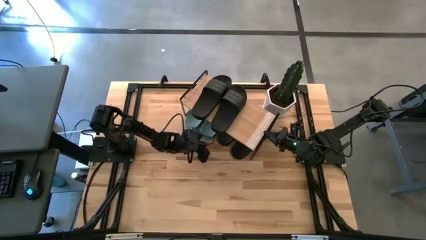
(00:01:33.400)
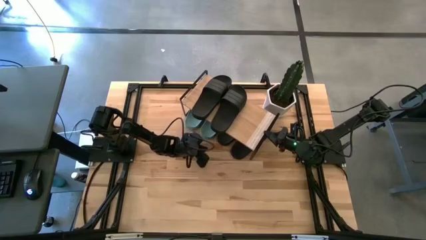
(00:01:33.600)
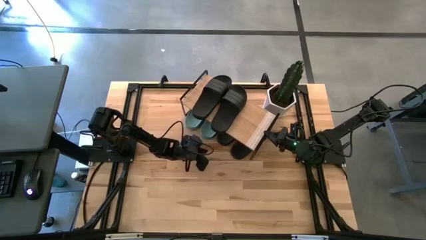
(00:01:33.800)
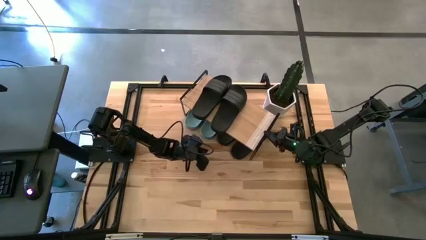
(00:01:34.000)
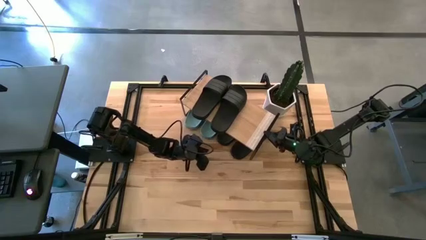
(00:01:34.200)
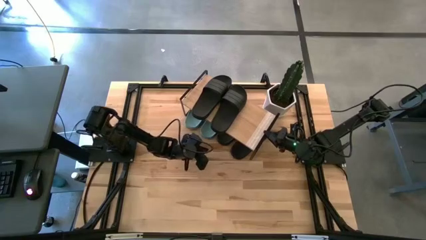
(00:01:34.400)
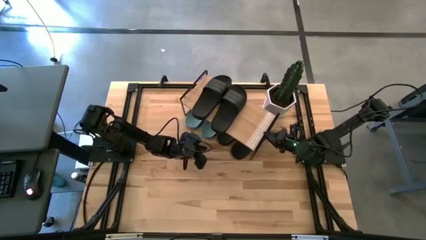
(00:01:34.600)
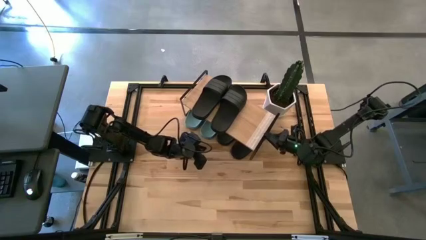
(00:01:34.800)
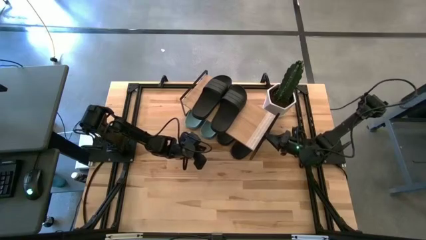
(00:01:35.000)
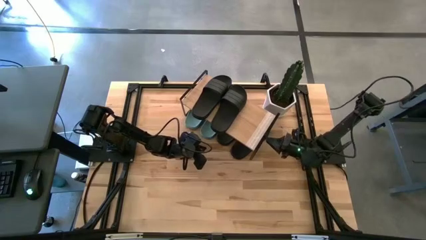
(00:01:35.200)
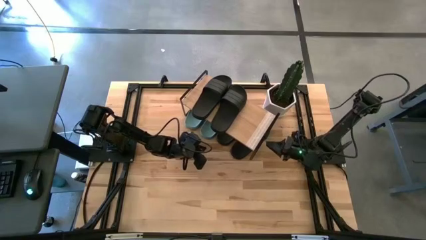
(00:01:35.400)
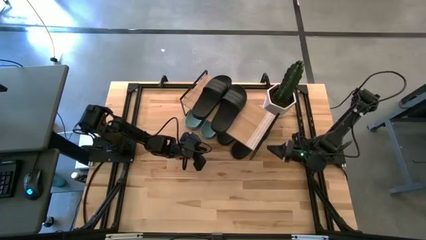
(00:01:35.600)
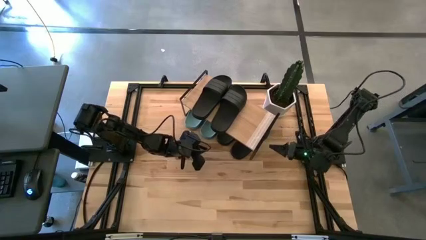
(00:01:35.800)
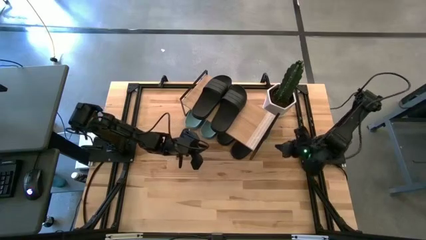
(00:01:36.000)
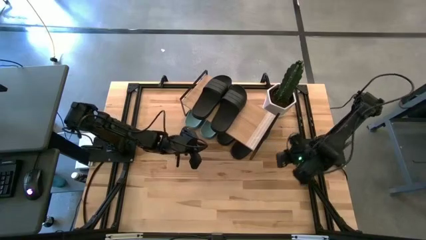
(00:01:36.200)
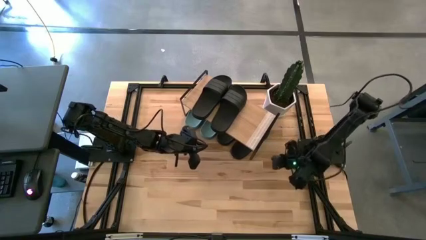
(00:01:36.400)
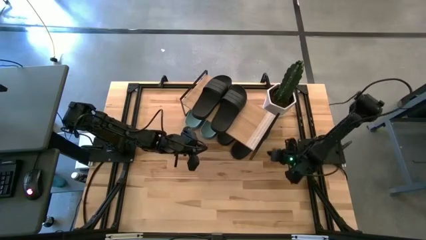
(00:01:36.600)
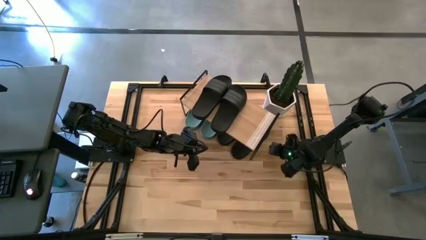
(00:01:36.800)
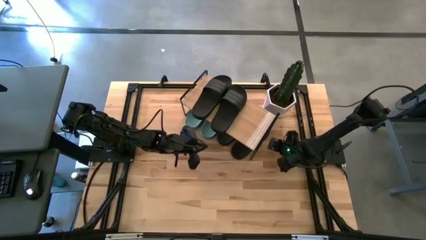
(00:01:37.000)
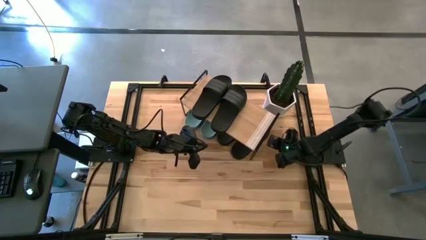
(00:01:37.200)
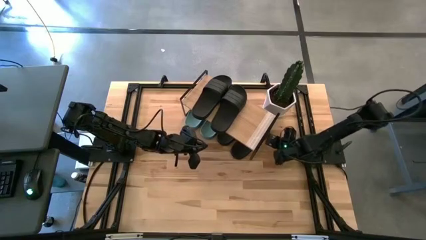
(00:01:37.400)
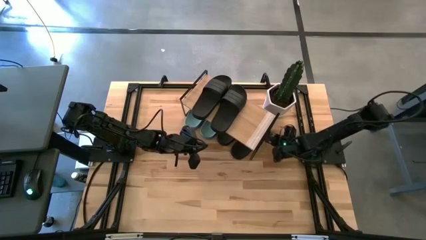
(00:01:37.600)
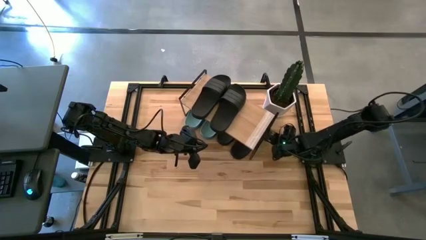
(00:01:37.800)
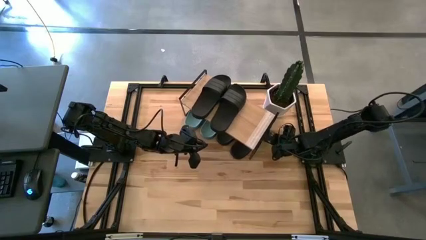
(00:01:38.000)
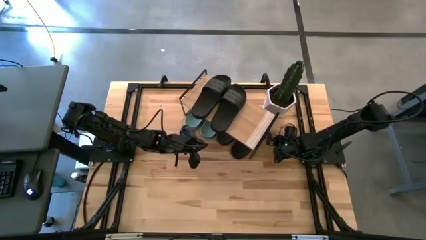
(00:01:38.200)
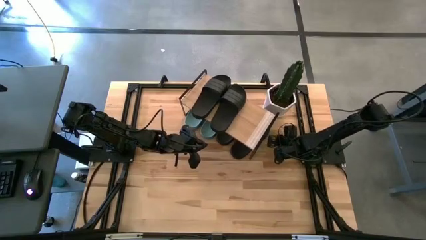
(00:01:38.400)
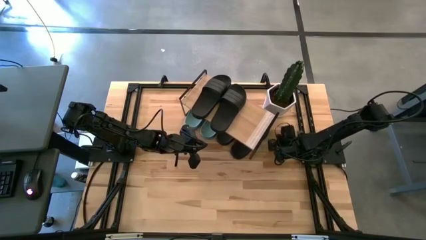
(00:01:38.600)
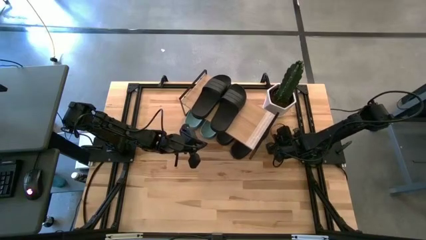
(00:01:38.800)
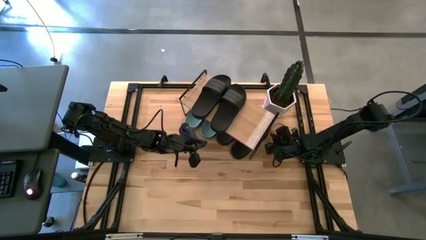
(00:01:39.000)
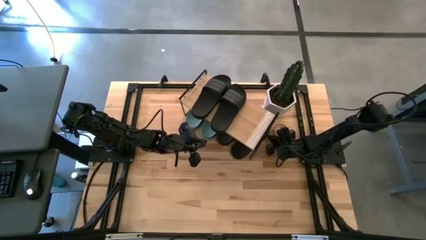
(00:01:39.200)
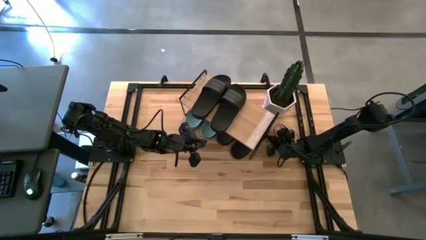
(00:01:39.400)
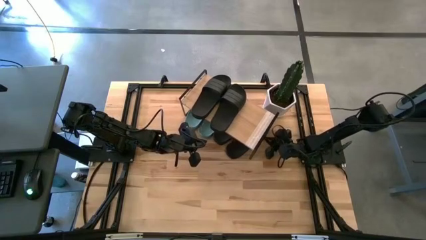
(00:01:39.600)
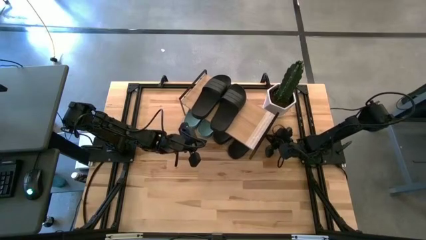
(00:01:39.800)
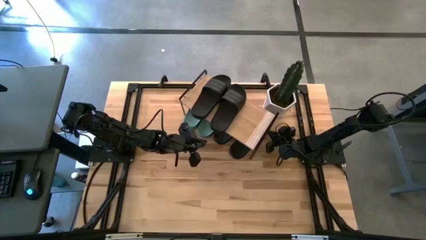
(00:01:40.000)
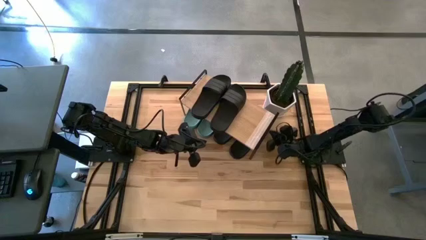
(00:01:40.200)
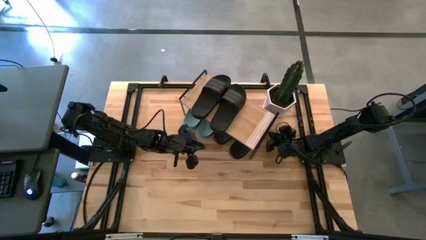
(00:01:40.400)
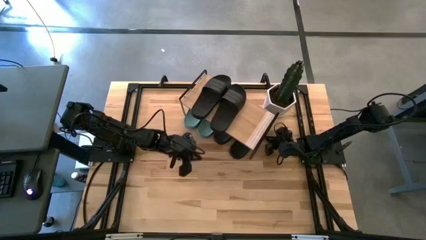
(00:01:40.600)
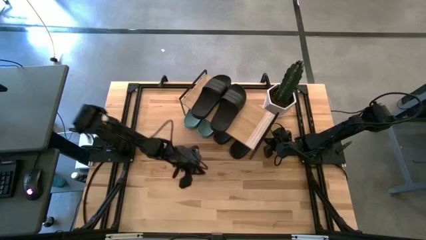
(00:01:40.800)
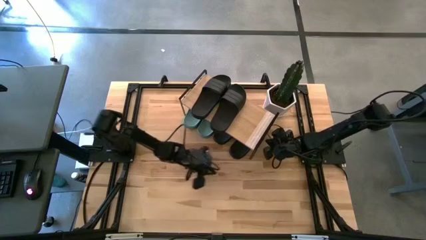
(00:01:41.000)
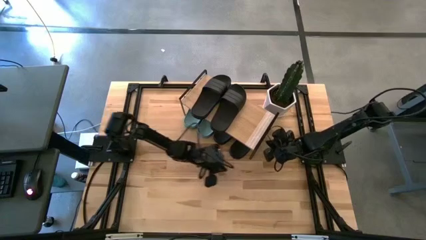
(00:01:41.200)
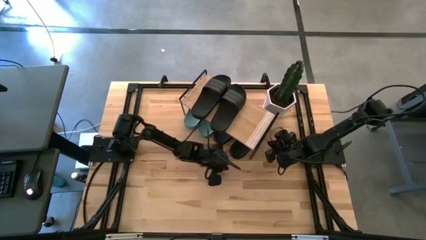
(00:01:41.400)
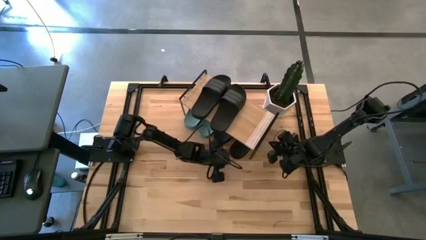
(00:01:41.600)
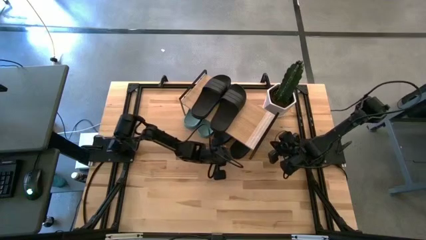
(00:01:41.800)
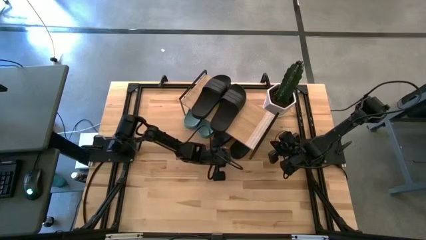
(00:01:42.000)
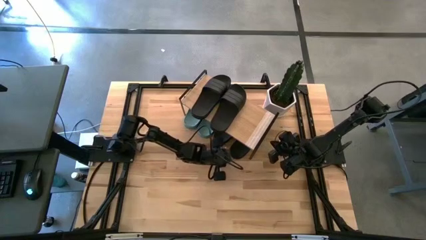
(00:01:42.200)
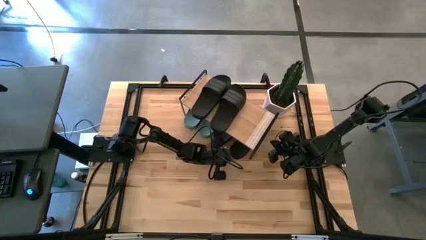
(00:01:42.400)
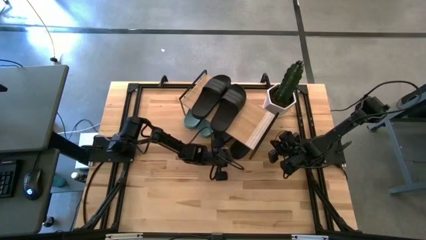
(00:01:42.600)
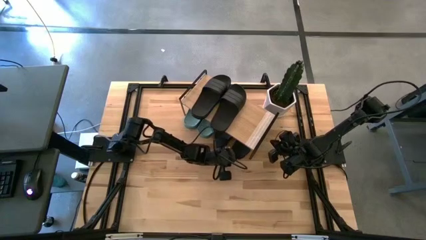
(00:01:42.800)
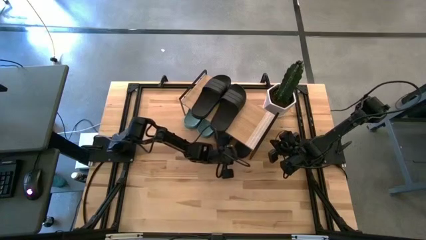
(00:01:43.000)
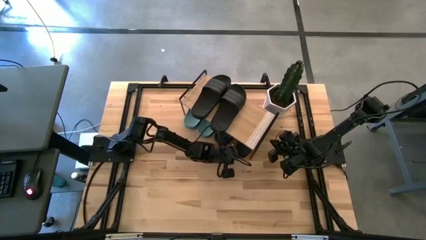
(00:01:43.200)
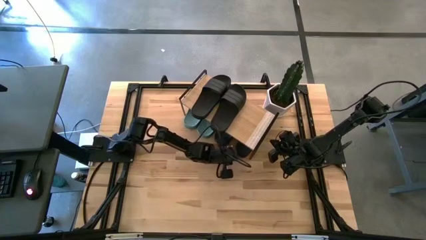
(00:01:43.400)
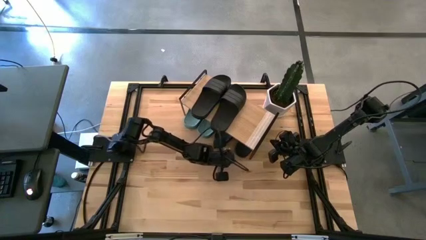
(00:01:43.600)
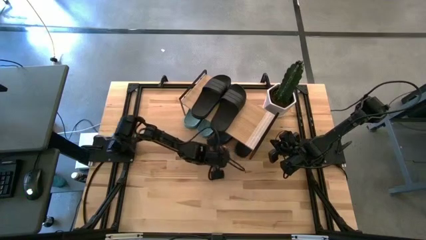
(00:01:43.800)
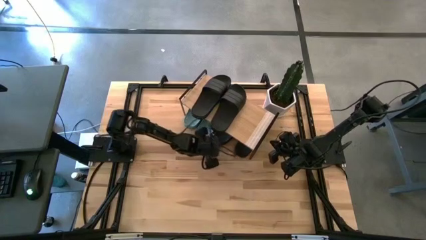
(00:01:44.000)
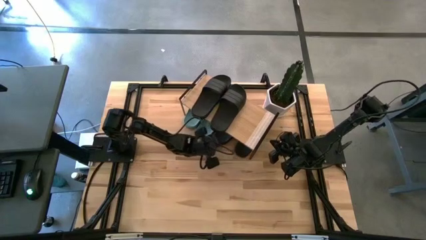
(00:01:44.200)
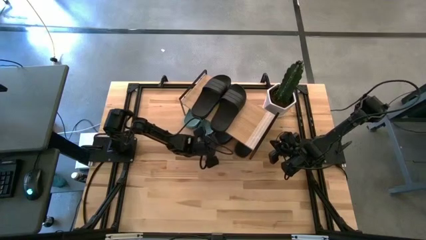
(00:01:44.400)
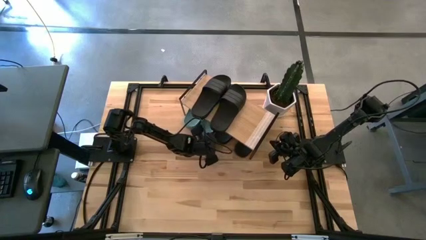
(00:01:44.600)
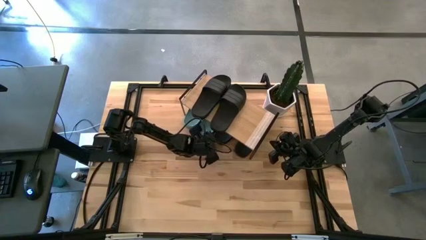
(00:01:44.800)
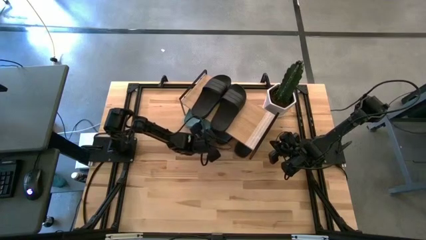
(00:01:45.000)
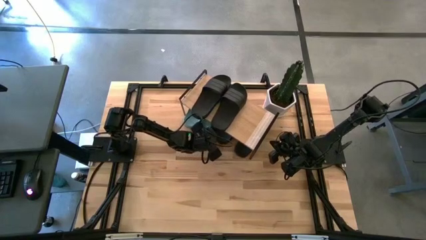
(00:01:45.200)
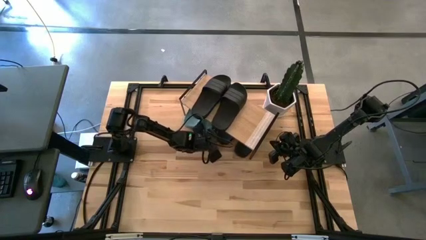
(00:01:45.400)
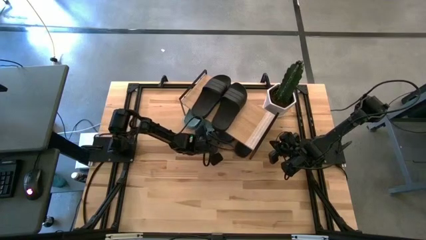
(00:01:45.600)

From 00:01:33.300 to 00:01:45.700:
Task: Pick and place slides into the shelf
Adjust the black slides under the shelf

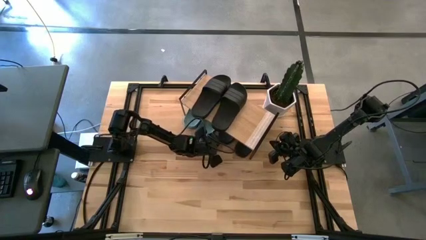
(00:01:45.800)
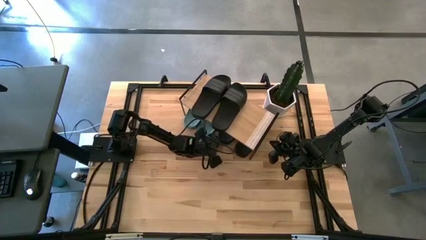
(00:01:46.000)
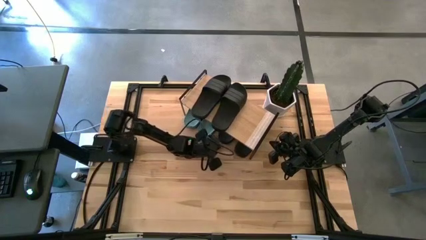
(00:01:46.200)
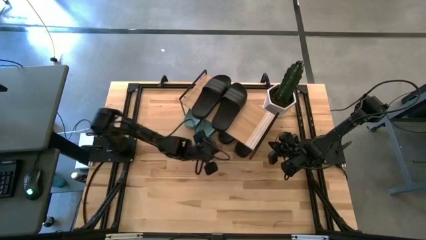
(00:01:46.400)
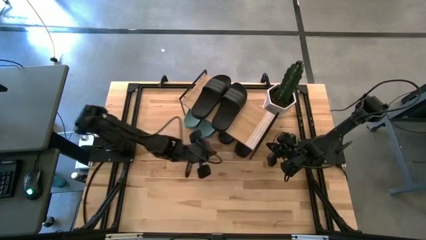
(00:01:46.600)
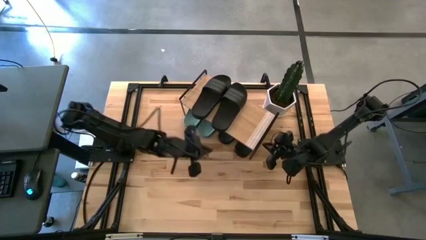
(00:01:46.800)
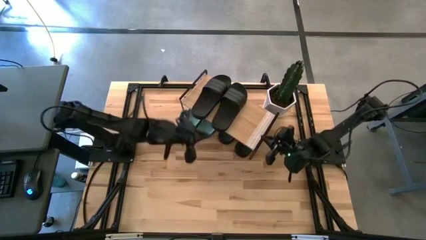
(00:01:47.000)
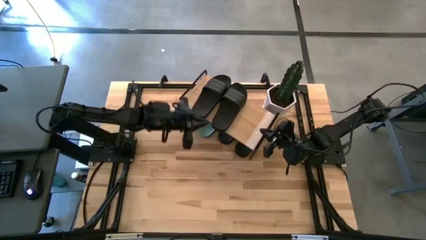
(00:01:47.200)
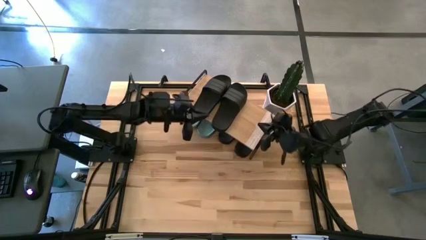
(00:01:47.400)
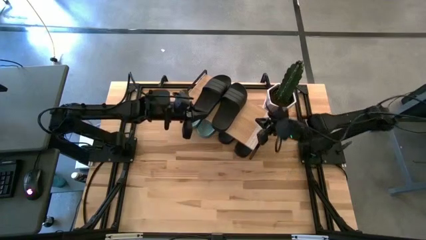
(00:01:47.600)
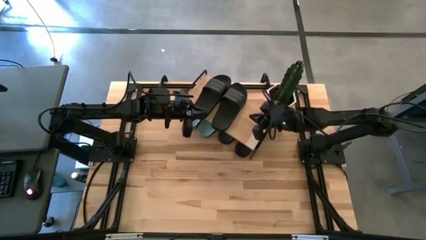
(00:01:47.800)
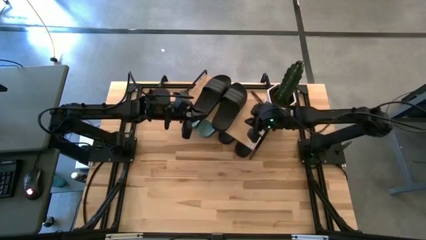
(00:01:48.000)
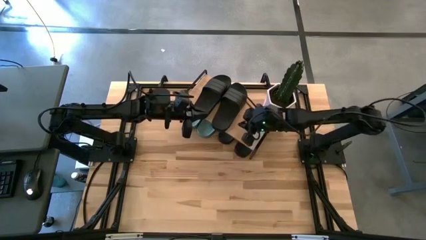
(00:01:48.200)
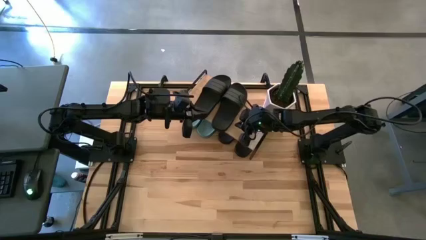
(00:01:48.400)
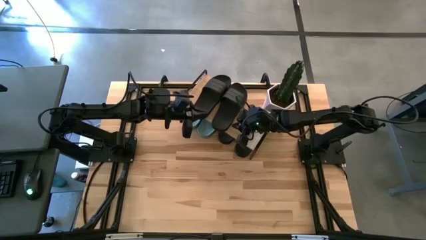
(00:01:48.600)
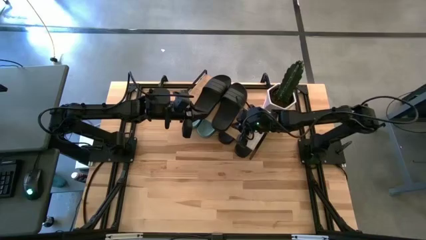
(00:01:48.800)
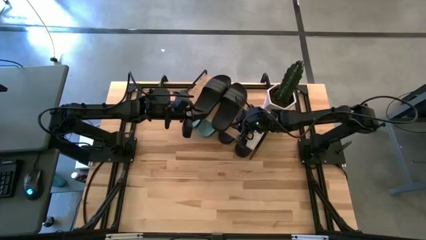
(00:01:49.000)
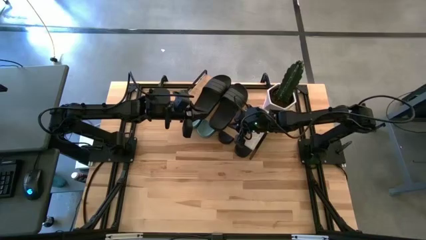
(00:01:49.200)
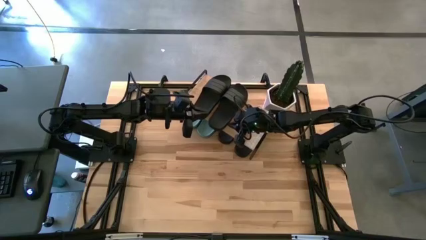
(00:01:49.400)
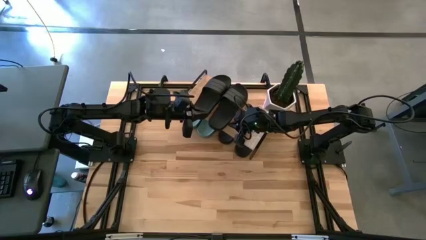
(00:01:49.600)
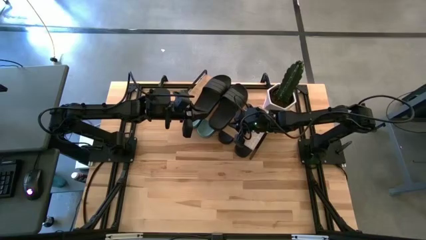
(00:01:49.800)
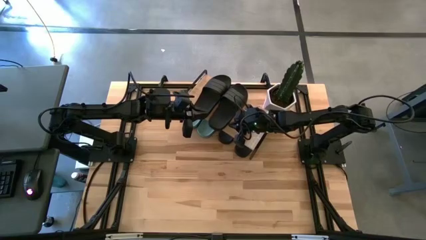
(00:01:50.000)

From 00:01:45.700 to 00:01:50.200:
Adjust the black slide on the shelf
